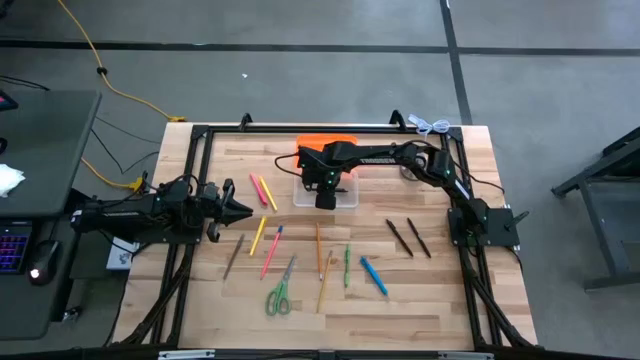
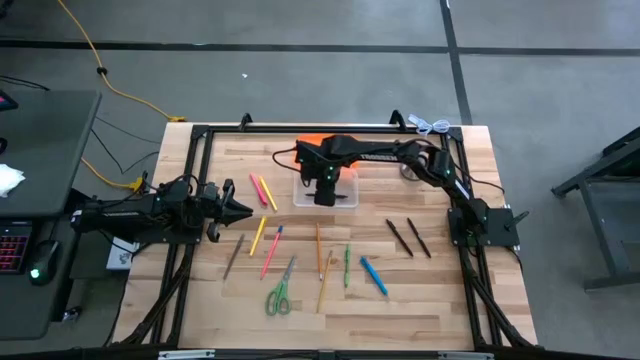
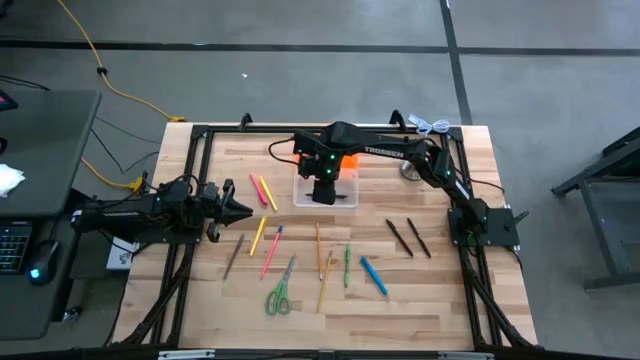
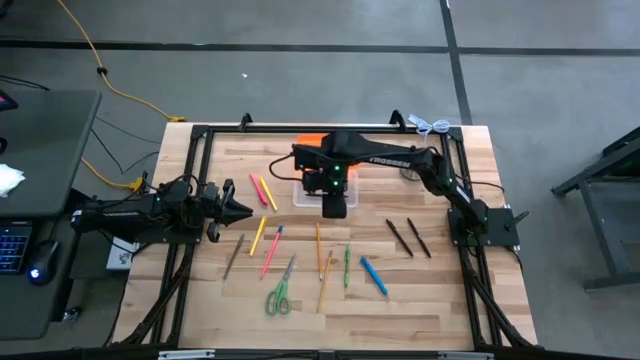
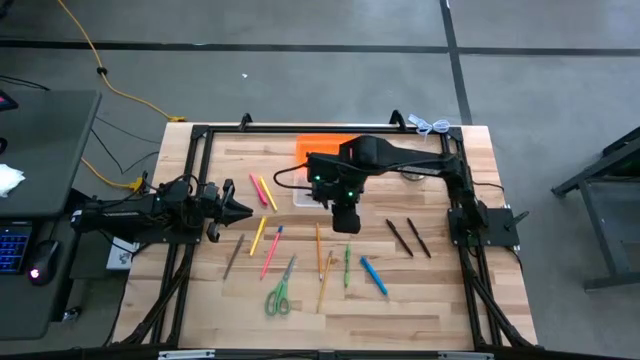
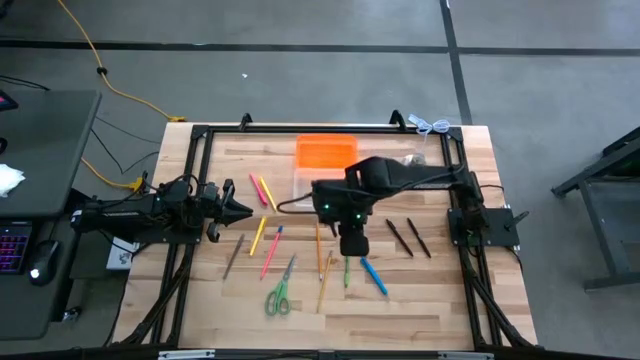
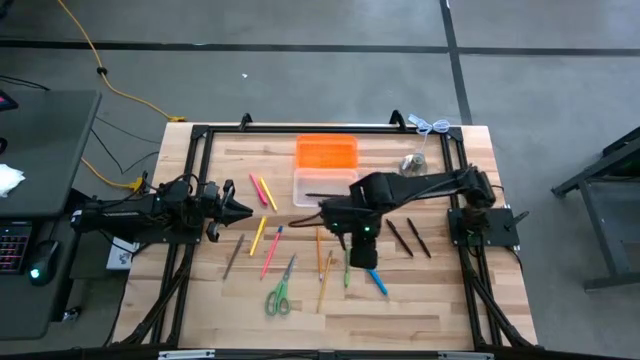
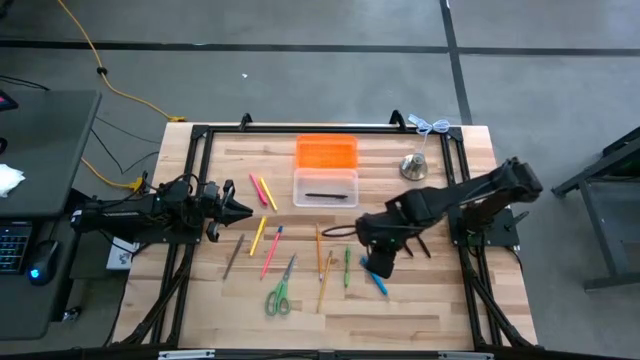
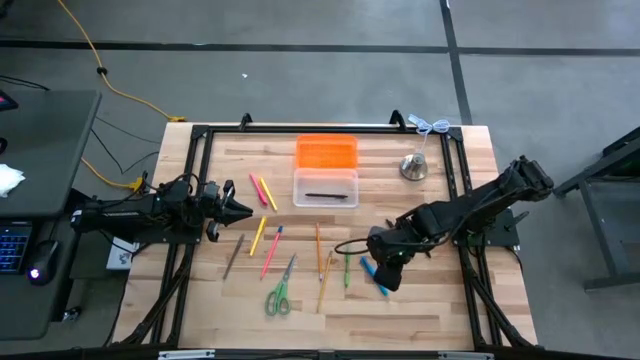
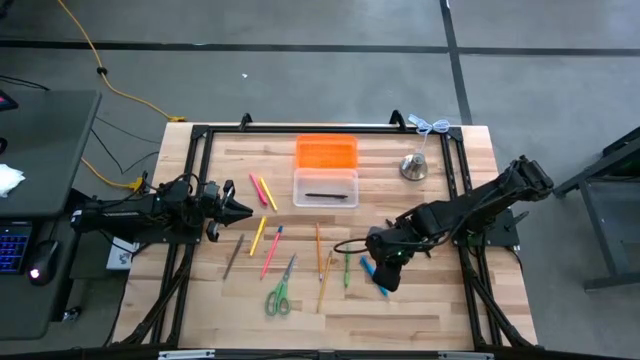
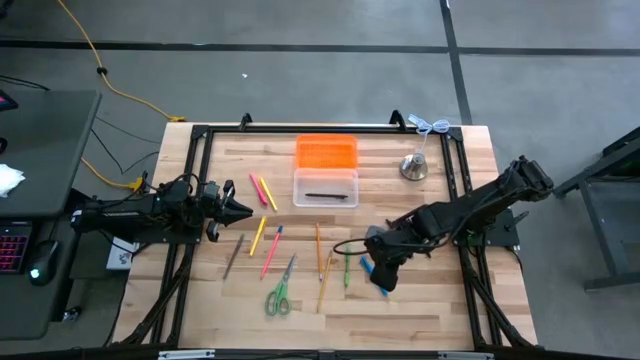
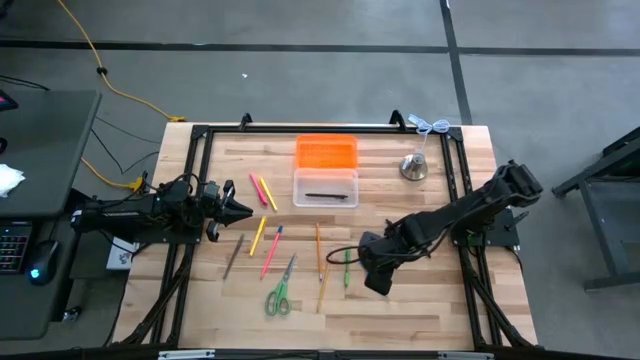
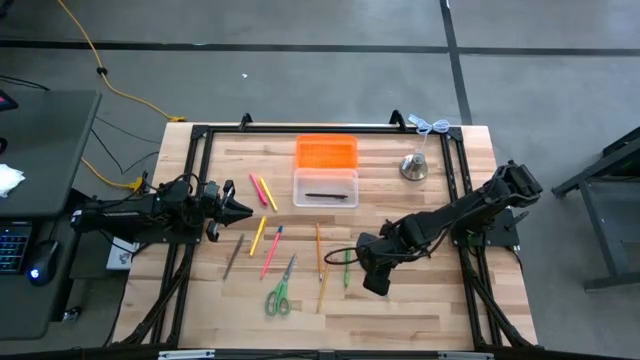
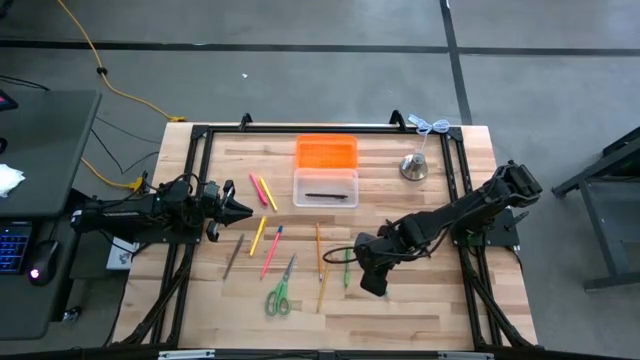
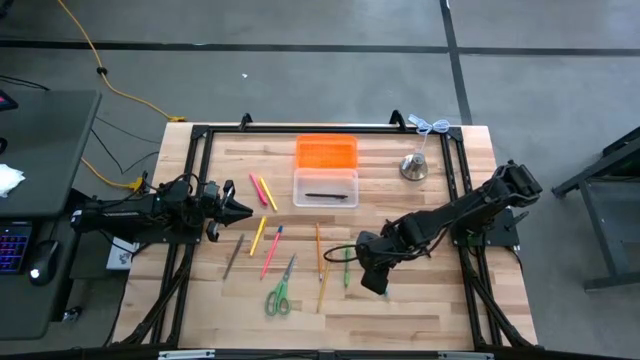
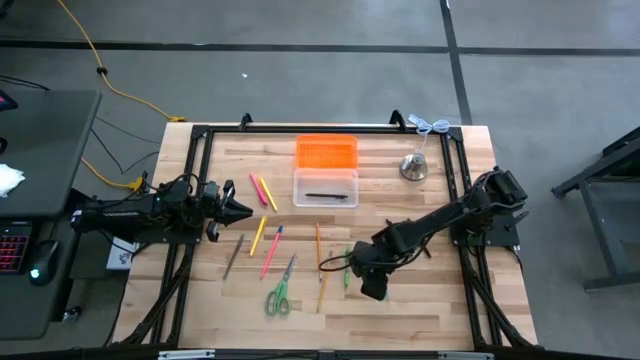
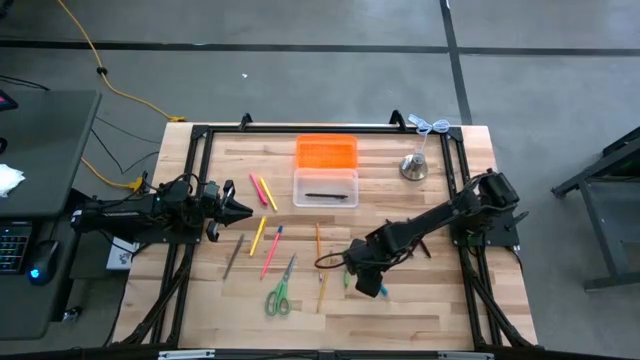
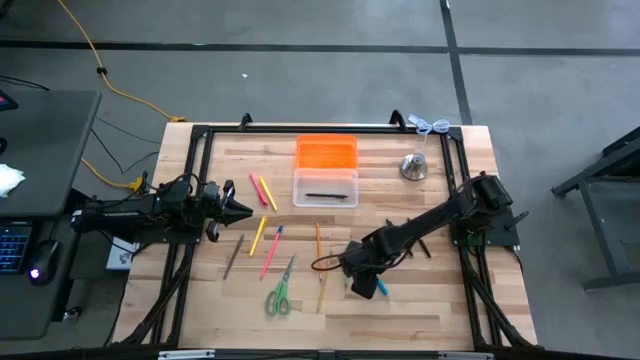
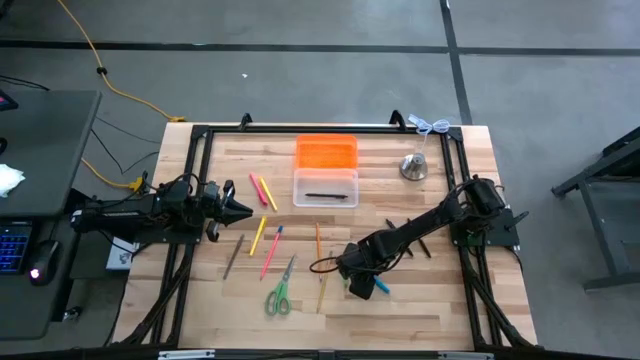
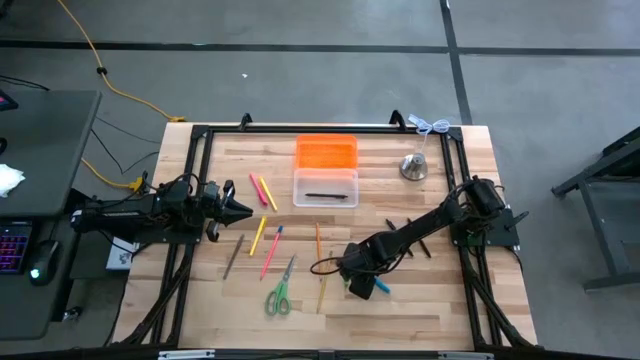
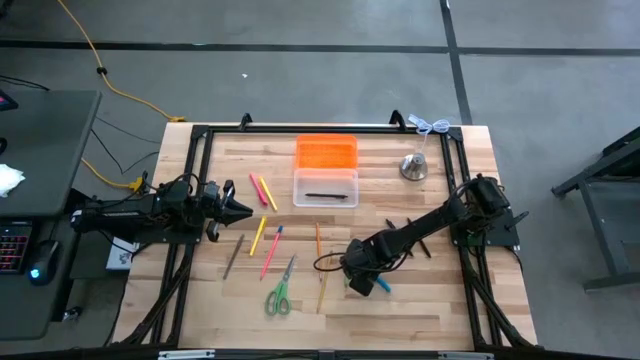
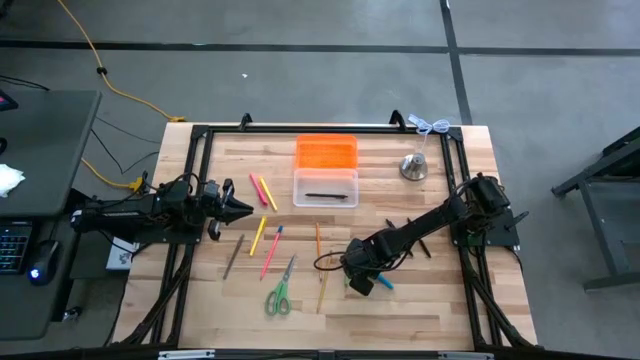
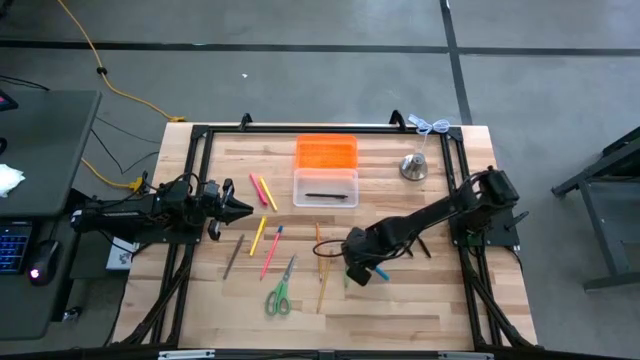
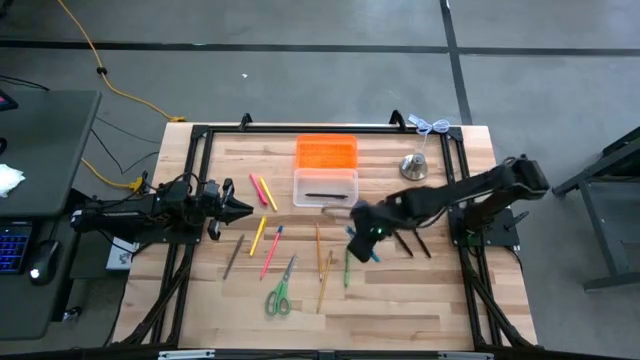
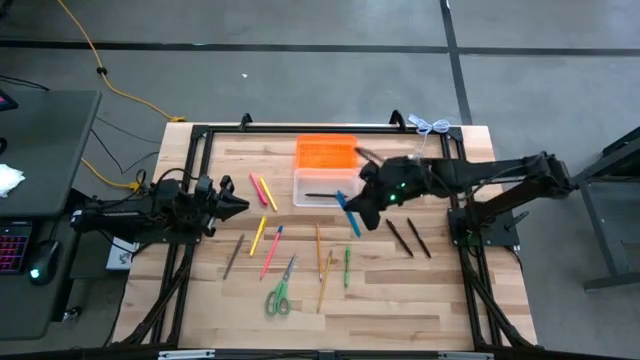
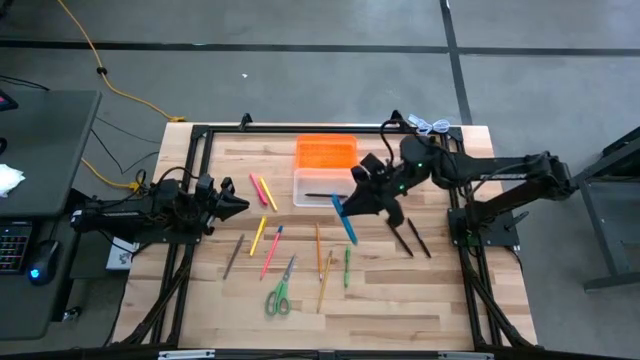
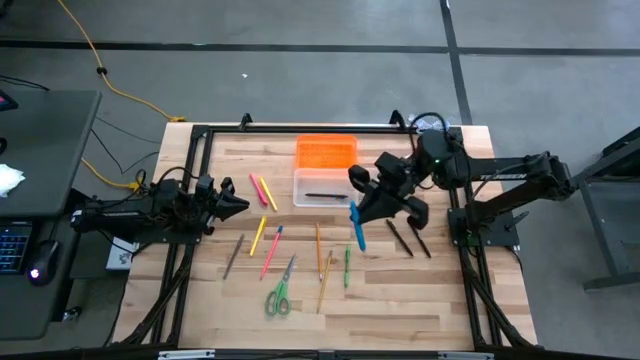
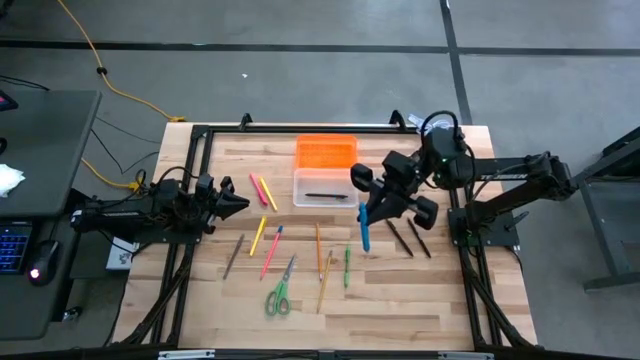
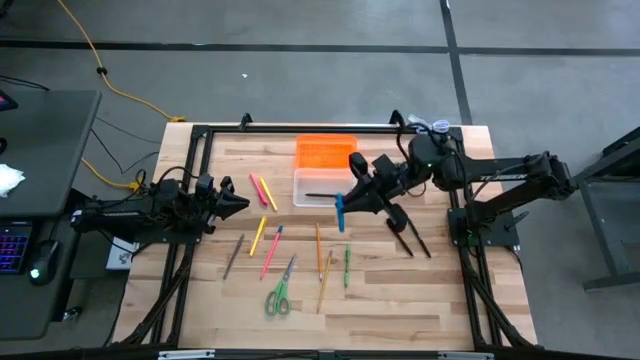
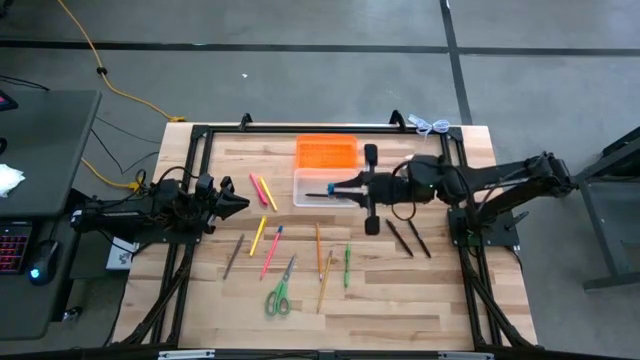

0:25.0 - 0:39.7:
Task: Pick & place school supplies into a supply box
Put the blue pen into the transparent supply box

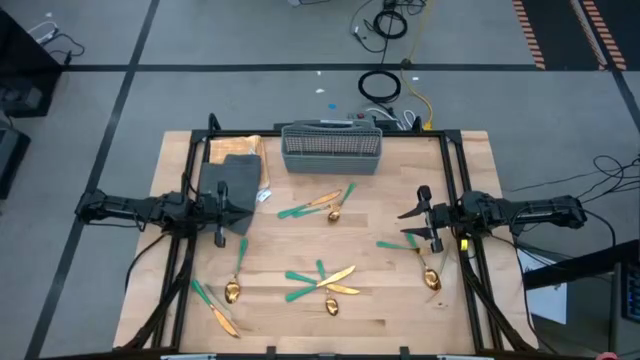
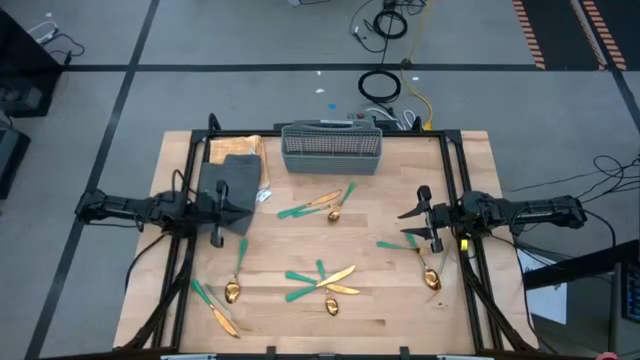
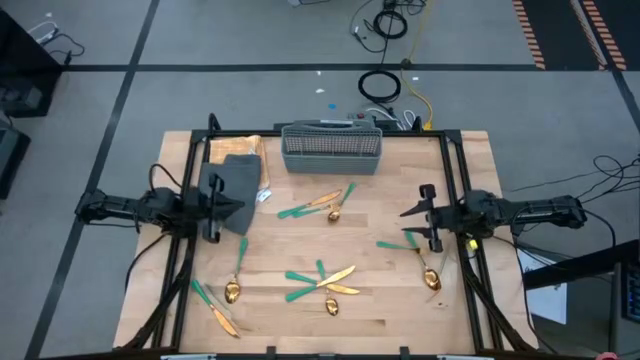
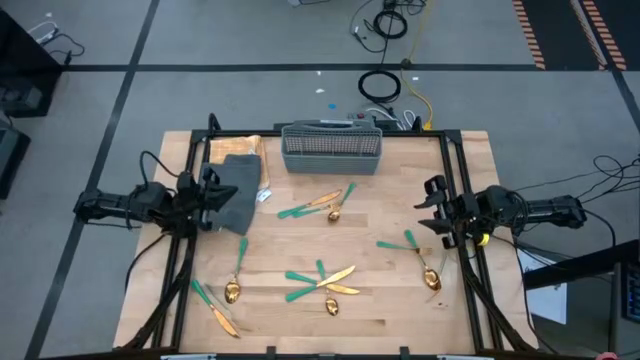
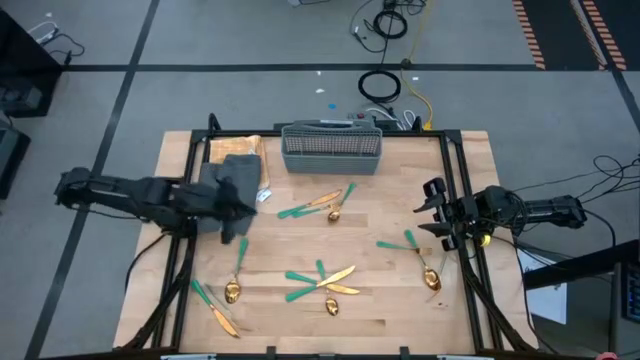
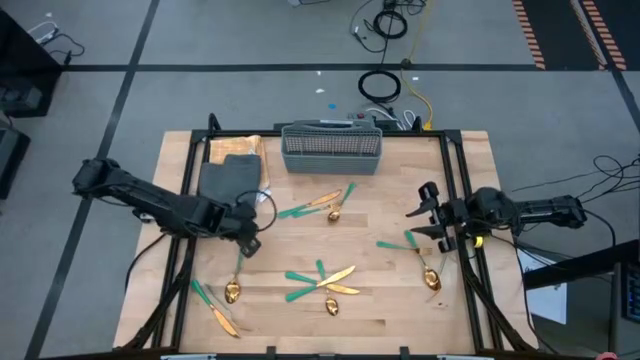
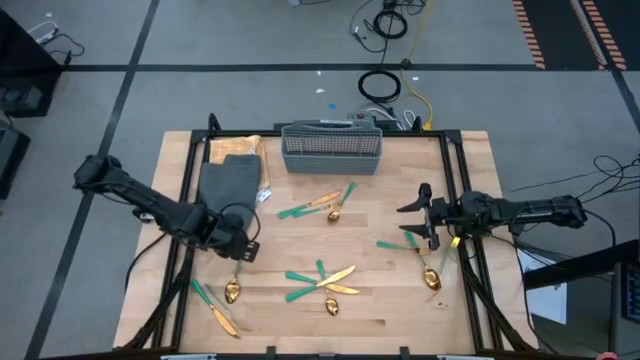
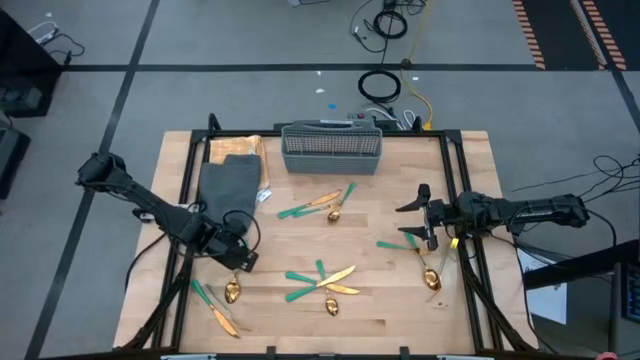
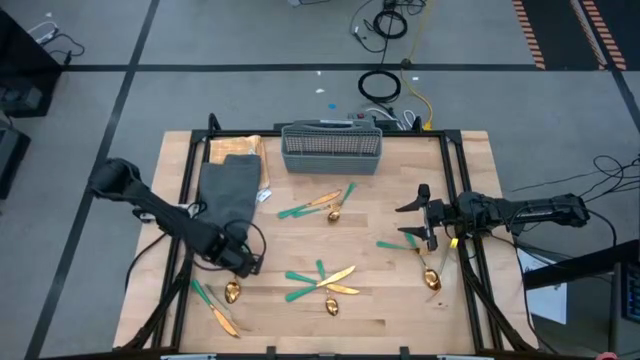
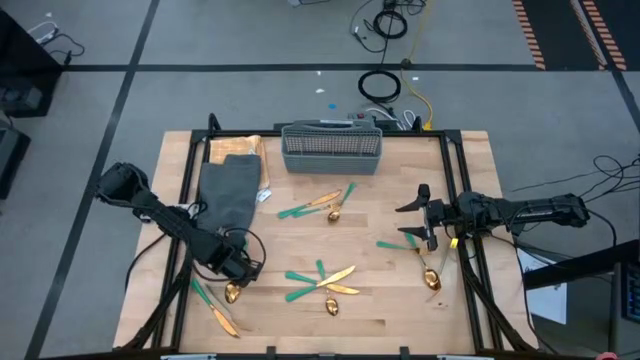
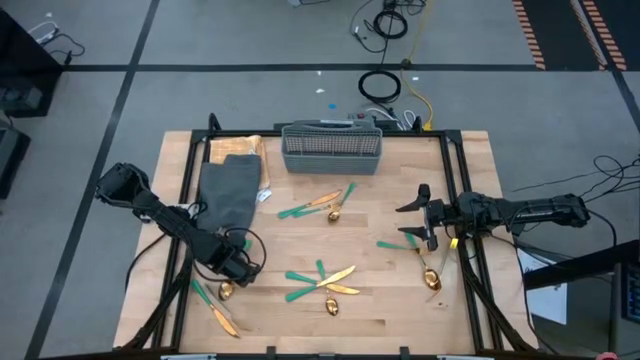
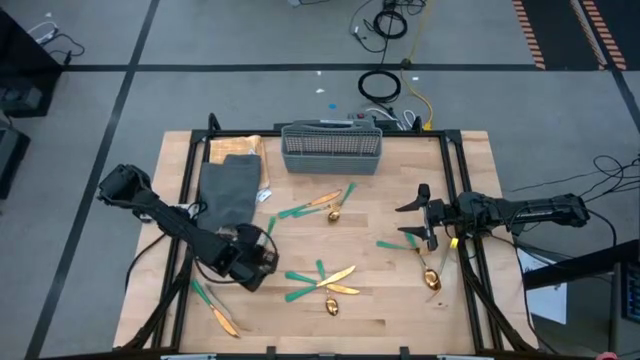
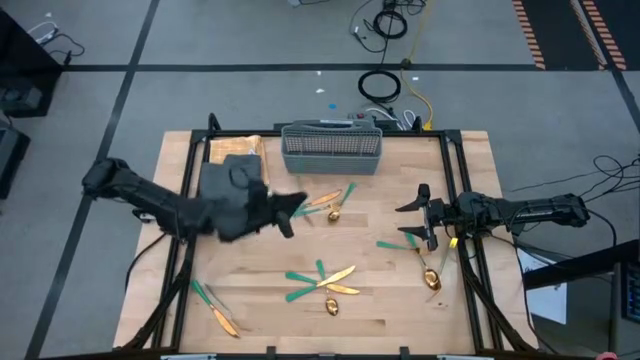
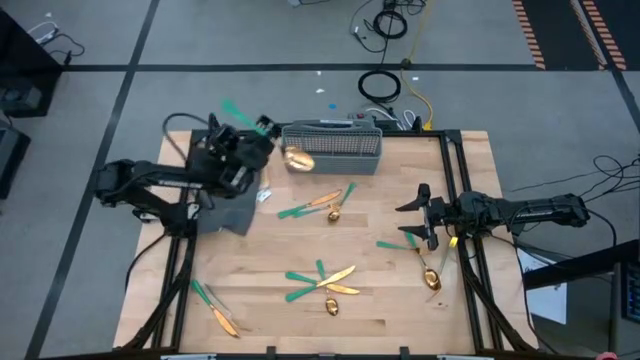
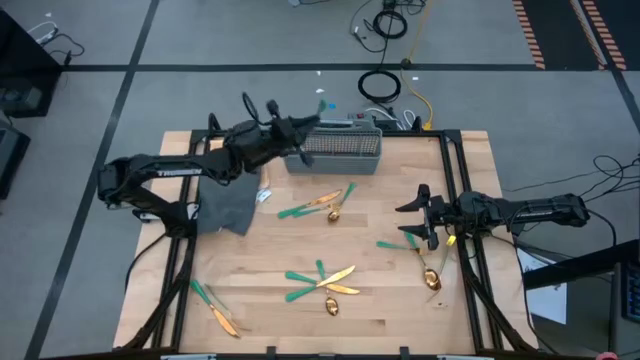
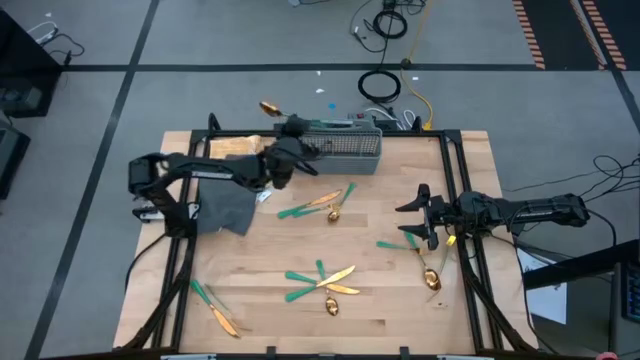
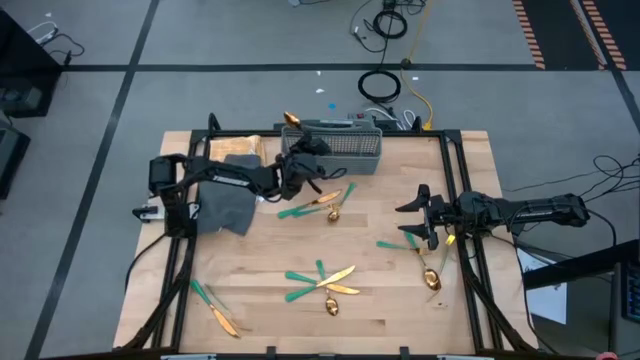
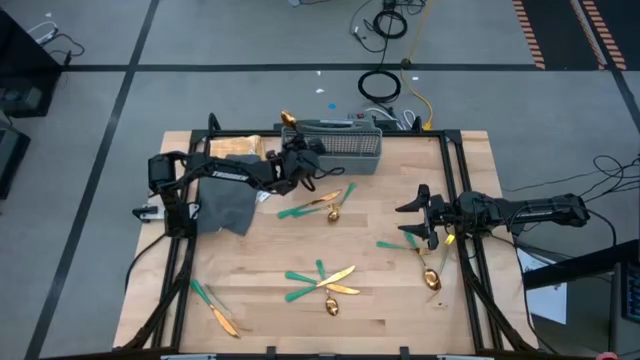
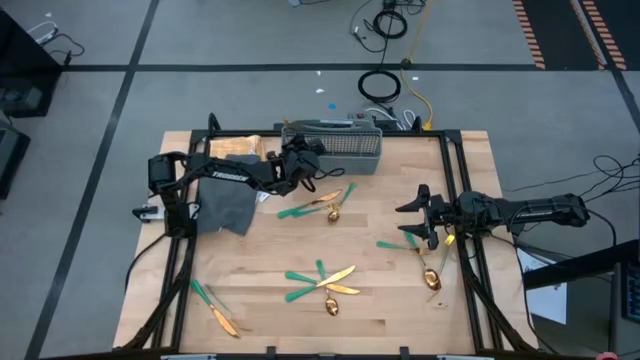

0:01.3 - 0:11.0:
Task: Sort silverware
Put the green spoon into the gray silverware basket
